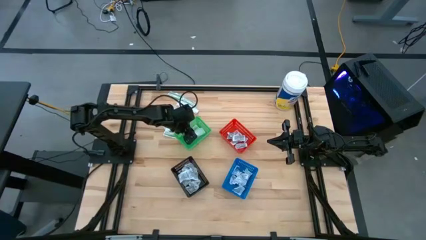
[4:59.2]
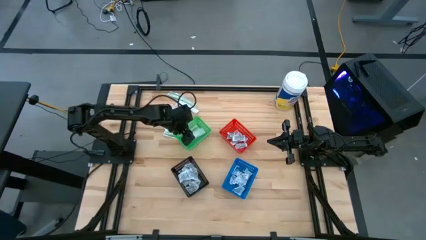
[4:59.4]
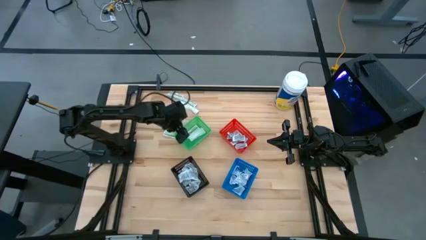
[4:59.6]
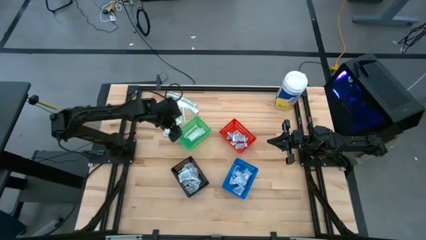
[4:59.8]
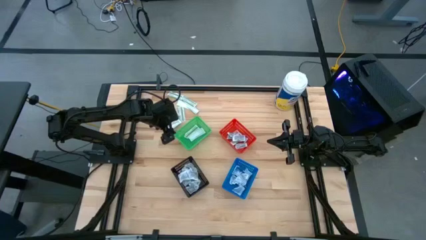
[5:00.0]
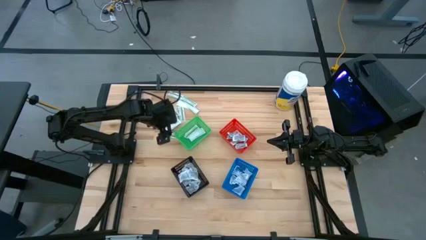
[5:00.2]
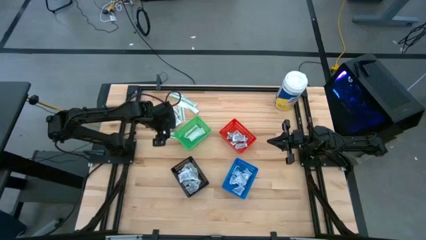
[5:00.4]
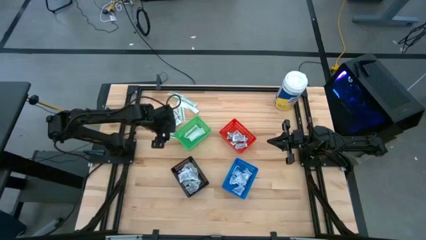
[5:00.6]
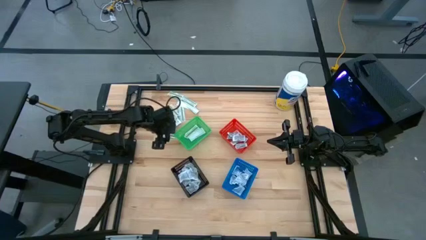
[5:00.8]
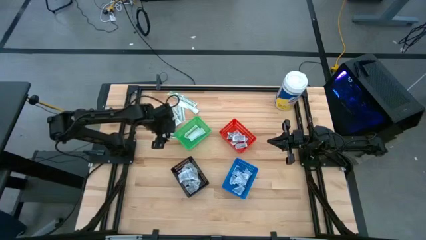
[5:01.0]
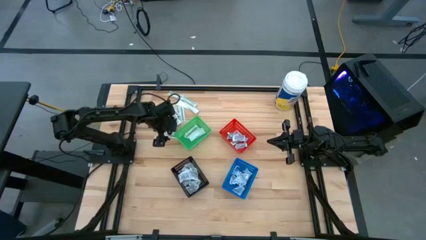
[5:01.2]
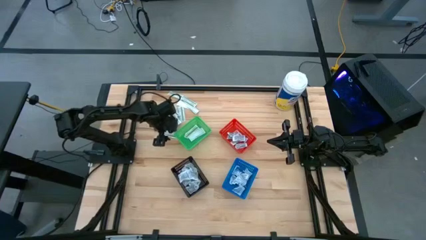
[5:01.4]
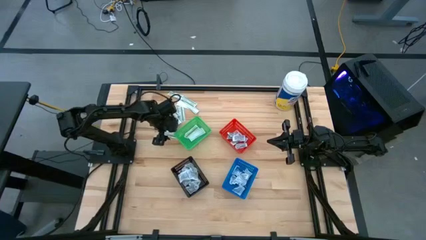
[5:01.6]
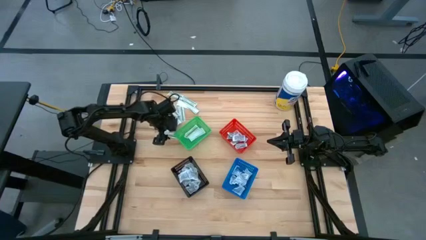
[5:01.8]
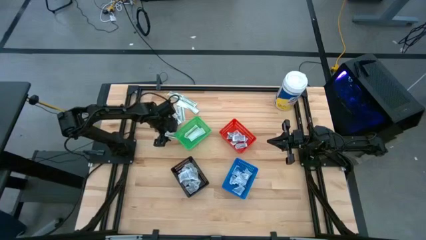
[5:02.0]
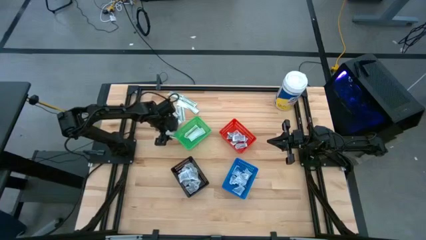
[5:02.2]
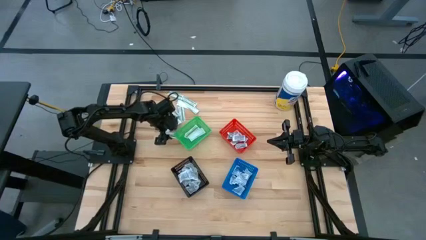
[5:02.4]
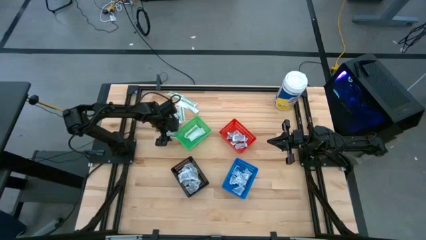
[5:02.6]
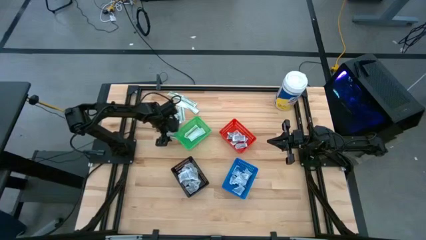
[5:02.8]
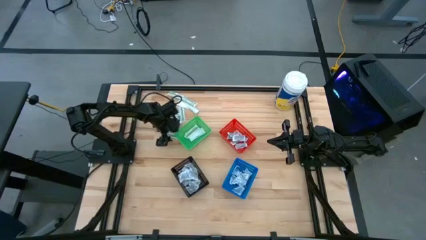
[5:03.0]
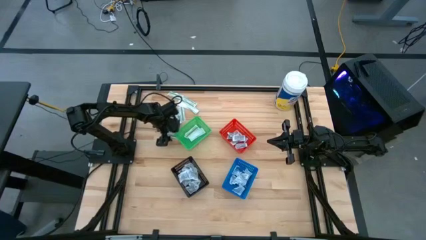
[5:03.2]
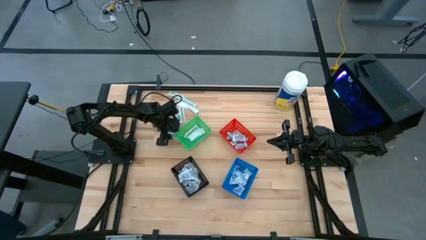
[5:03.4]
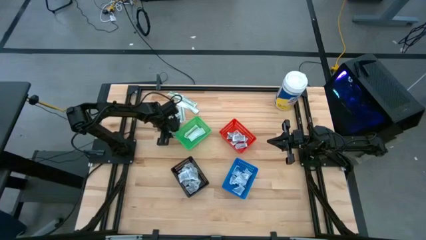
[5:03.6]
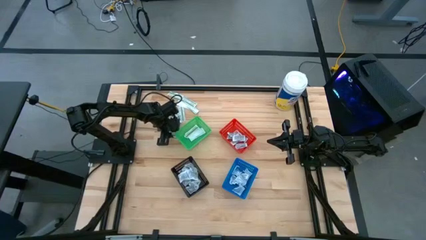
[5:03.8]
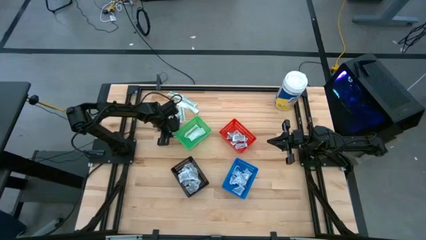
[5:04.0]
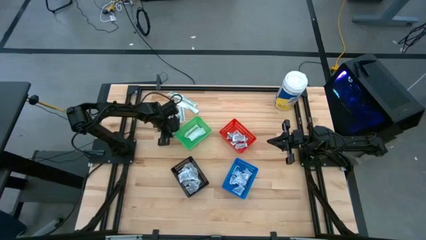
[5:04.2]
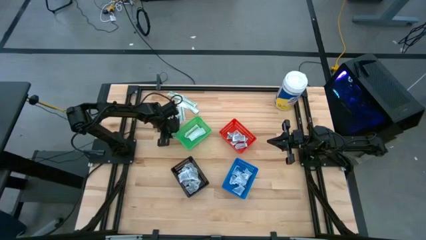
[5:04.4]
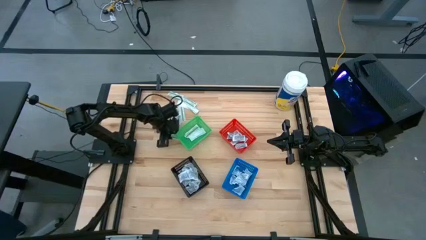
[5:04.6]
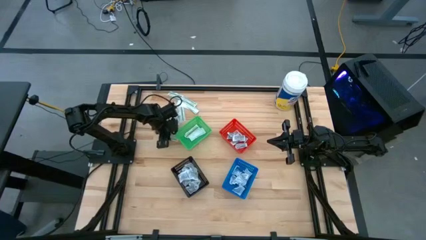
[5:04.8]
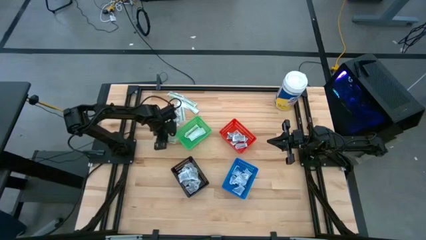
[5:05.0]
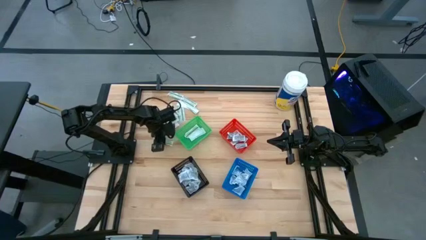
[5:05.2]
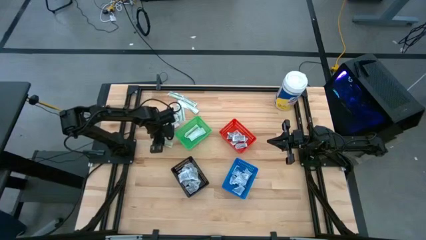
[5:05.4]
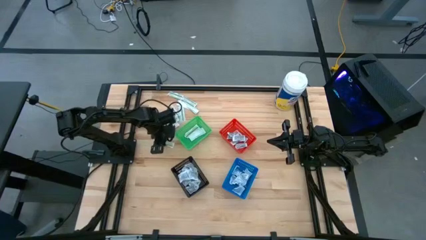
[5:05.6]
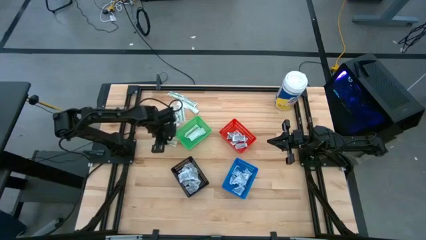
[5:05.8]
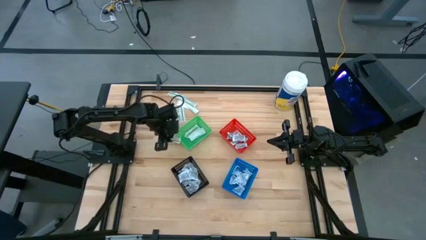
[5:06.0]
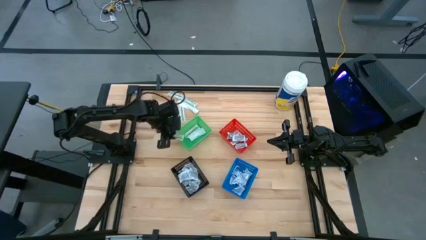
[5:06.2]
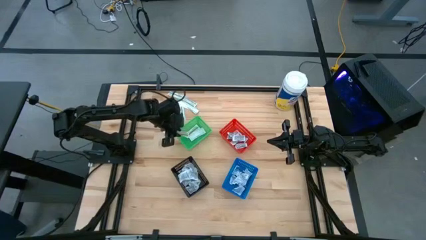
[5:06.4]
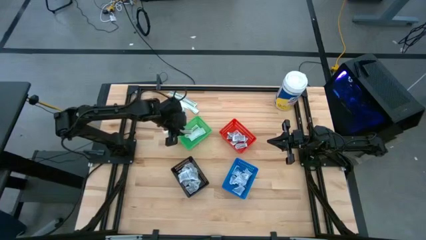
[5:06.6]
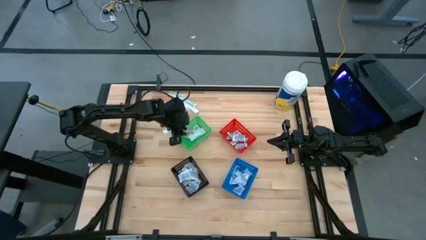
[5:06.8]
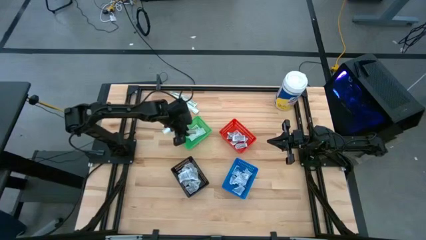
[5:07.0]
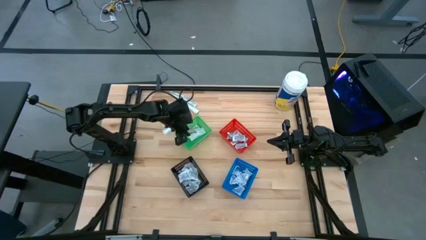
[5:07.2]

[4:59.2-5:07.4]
Task: Pick & Place First Aid Supplies
Put the green bandage pack into the green bin

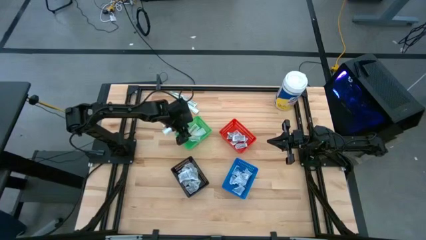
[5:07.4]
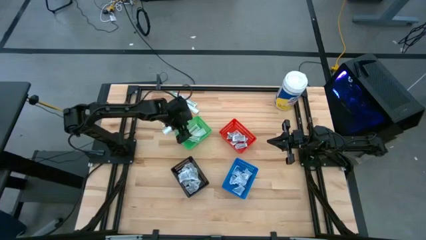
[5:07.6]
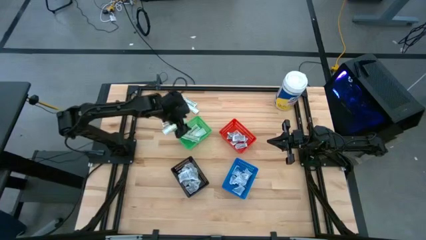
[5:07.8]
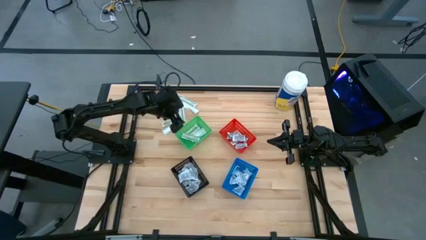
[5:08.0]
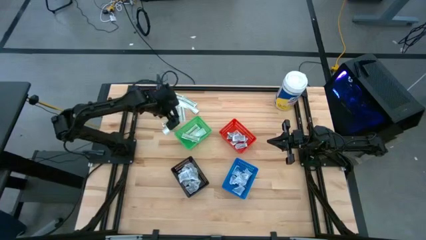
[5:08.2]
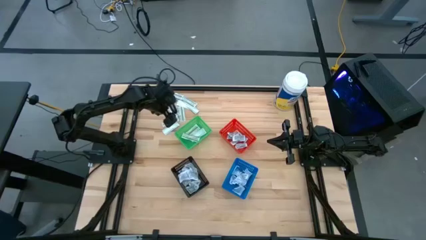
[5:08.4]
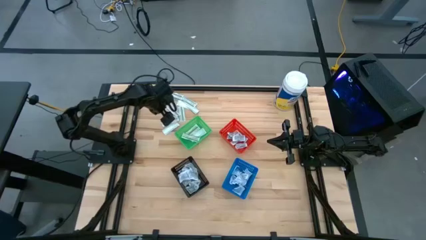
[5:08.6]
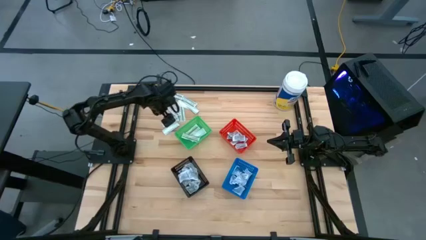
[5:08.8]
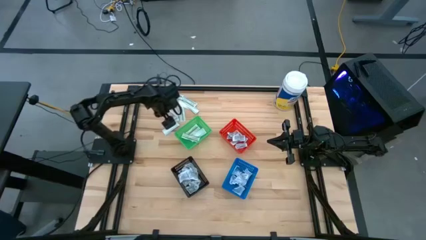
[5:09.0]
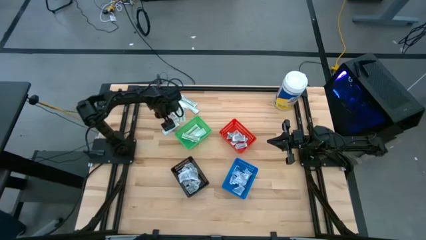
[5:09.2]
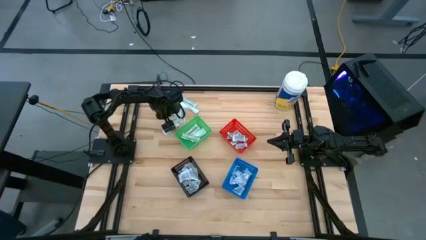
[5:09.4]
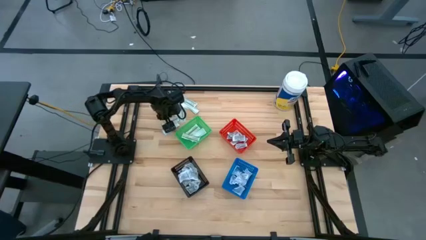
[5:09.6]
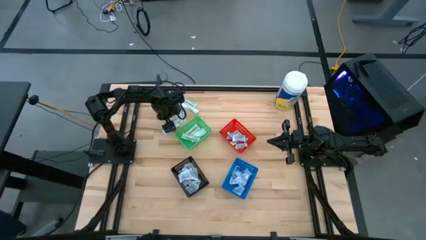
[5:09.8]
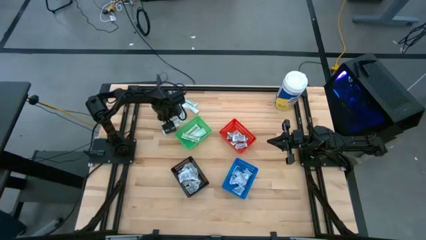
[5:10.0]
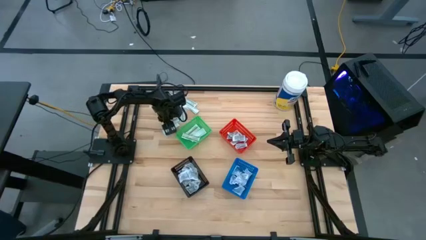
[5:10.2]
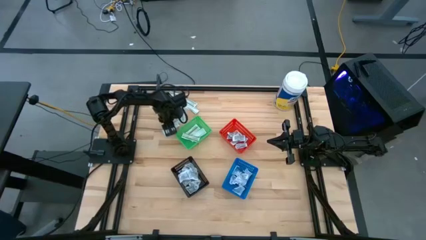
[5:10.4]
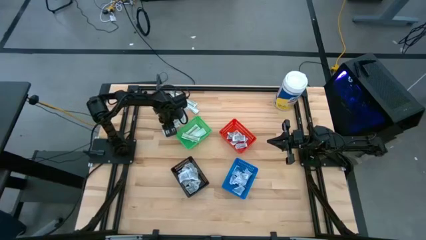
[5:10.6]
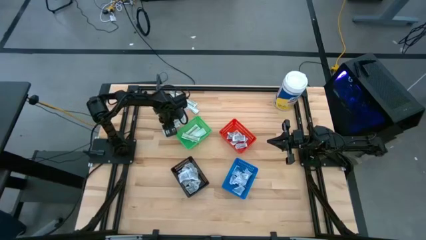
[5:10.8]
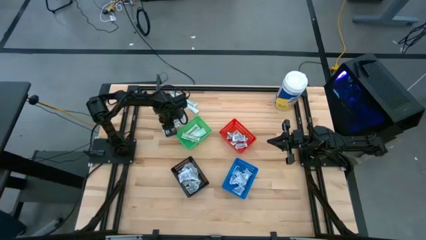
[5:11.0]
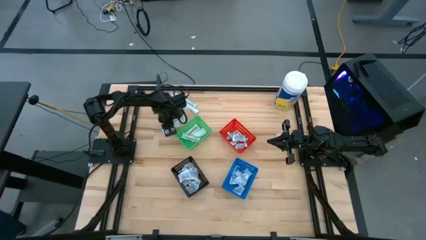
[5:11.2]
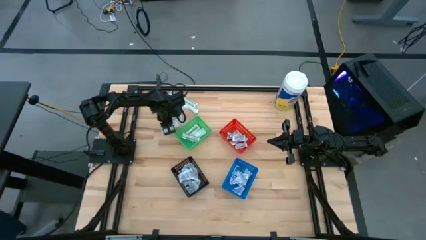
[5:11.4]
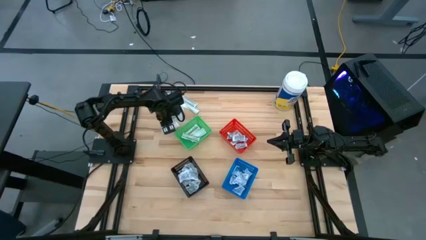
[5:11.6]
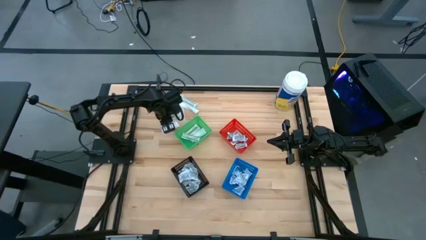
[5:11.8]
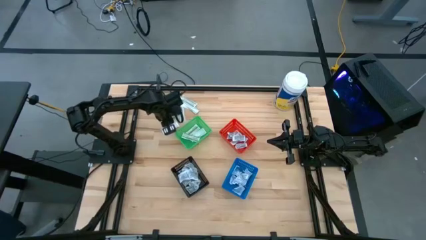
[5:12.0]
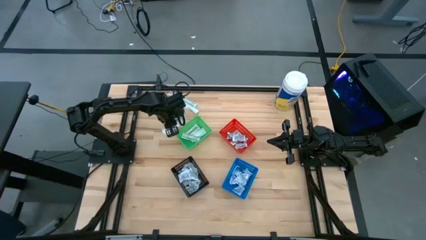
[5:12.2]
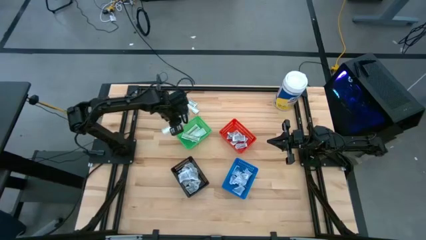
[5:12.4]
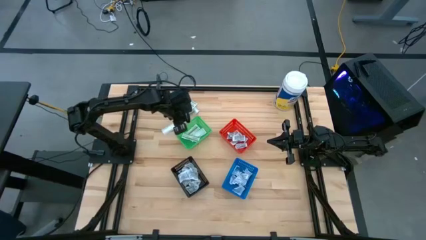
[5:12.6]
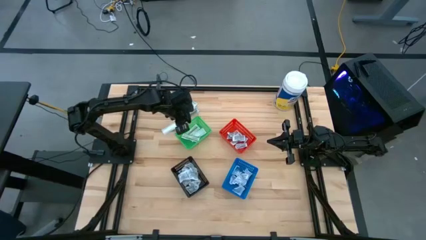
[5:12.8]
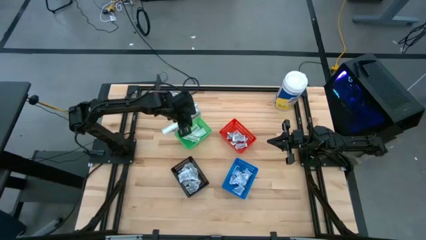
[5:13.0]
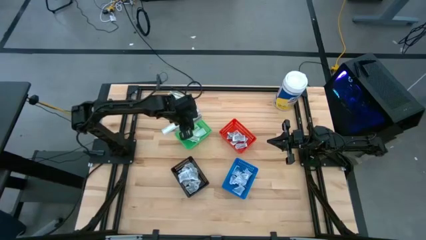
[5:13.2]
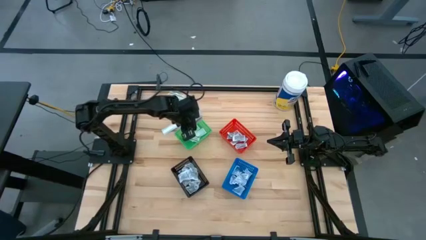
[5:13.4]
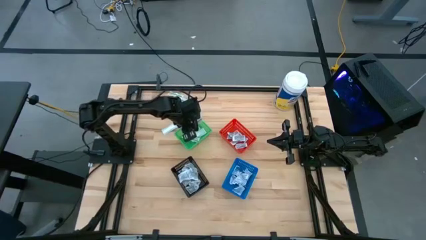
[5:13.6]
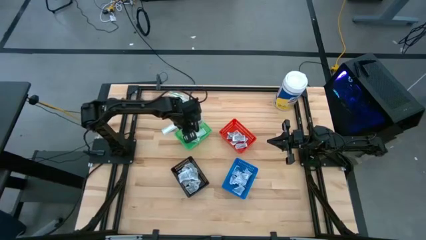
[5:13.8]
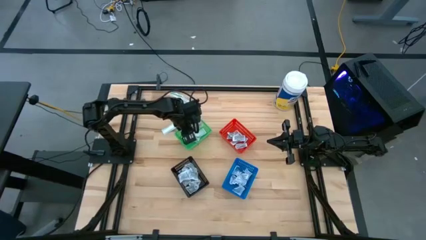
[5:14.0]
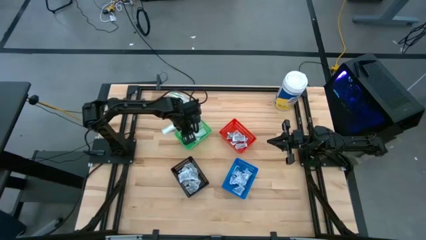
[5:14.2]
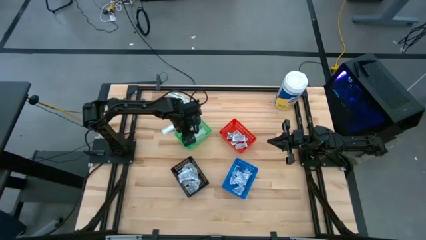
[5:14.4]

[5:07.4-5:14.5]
Put the green bandage pack into the green bin
